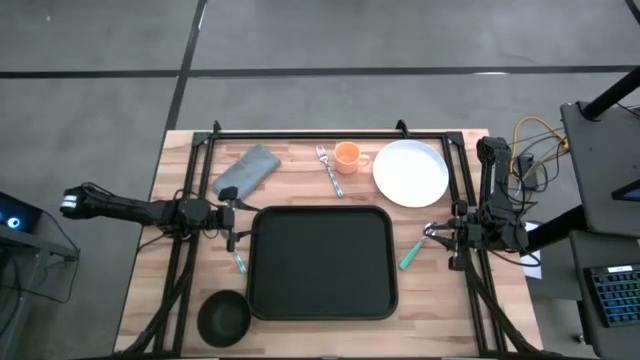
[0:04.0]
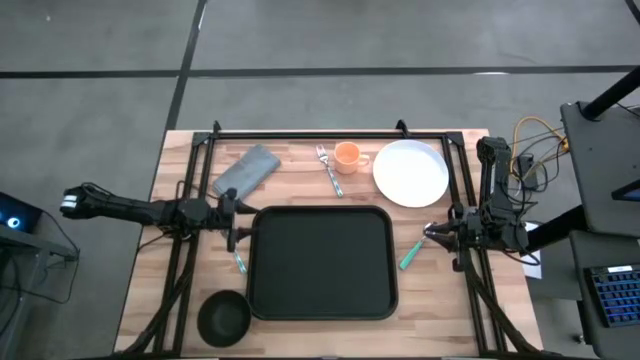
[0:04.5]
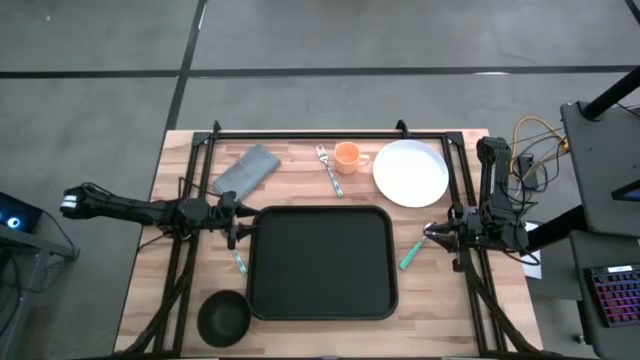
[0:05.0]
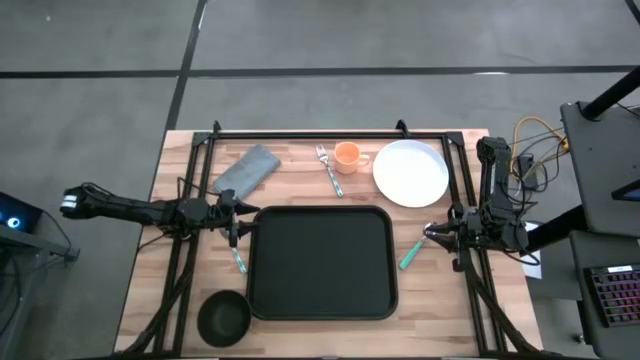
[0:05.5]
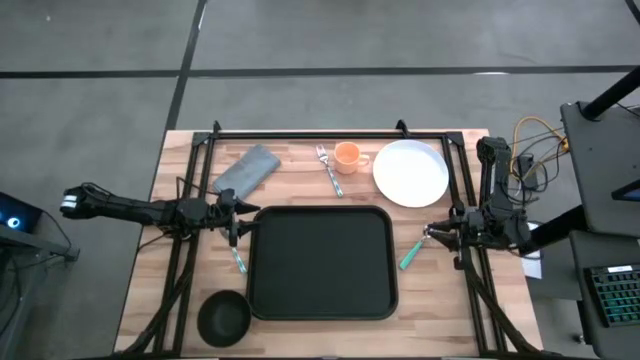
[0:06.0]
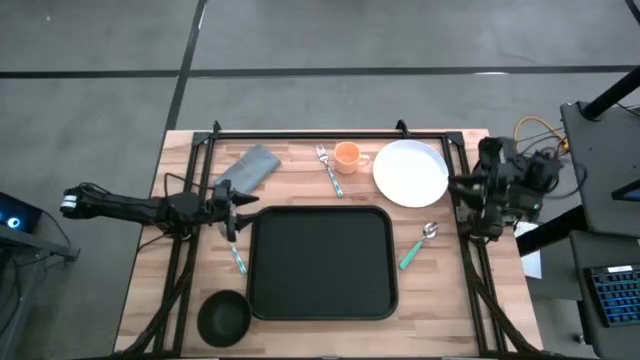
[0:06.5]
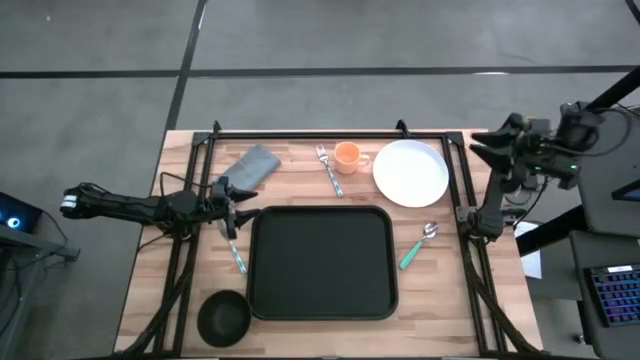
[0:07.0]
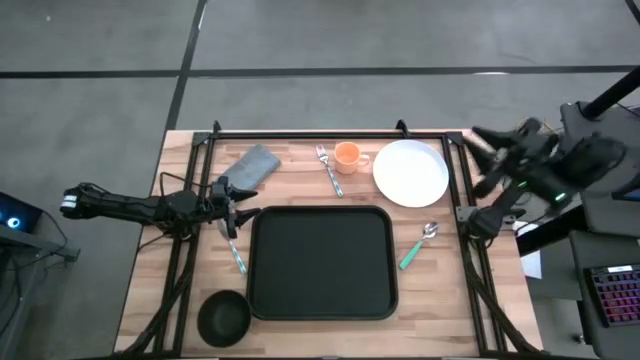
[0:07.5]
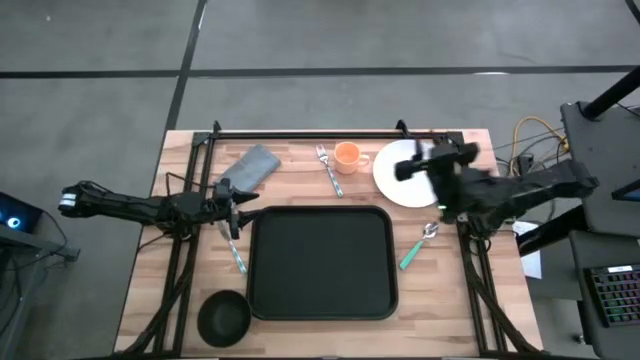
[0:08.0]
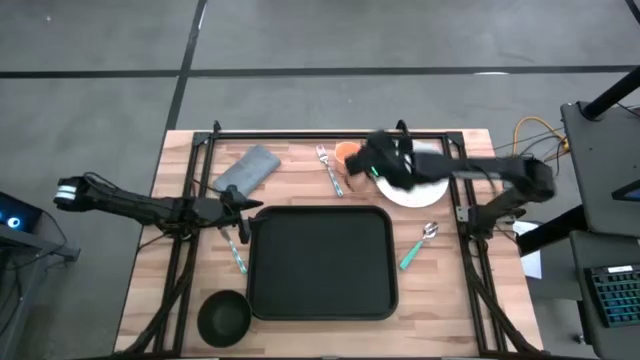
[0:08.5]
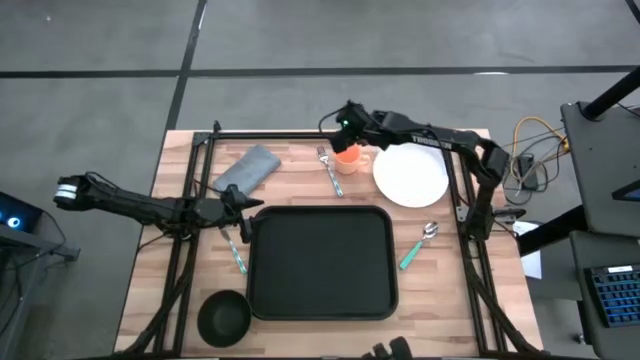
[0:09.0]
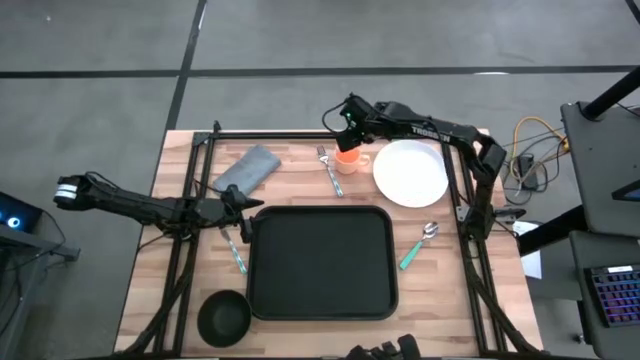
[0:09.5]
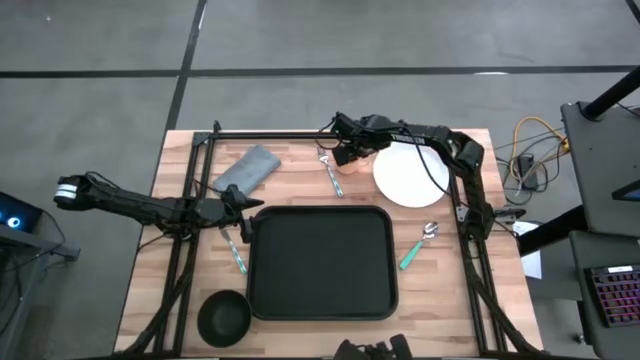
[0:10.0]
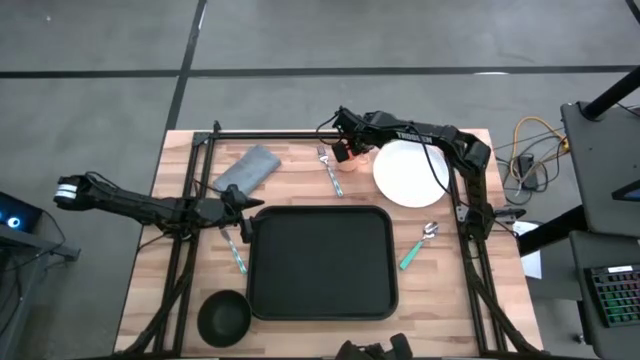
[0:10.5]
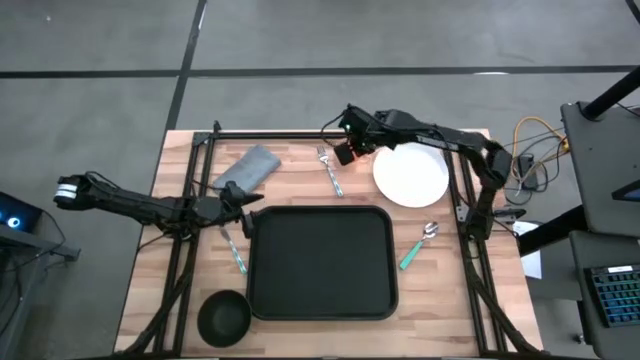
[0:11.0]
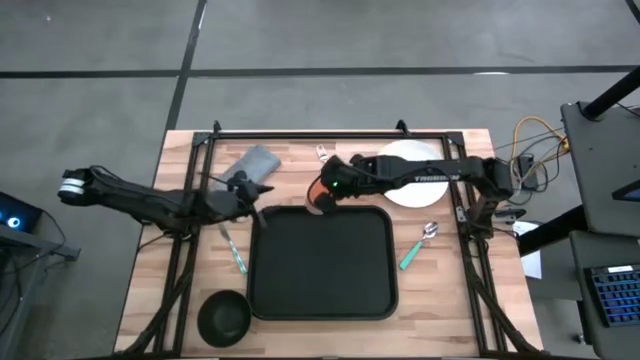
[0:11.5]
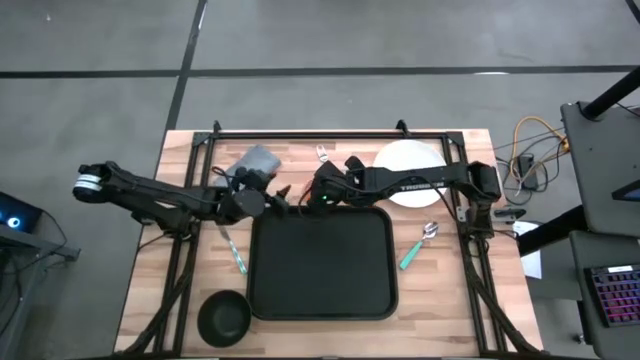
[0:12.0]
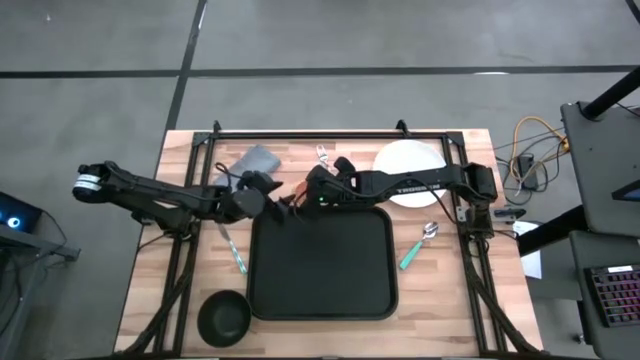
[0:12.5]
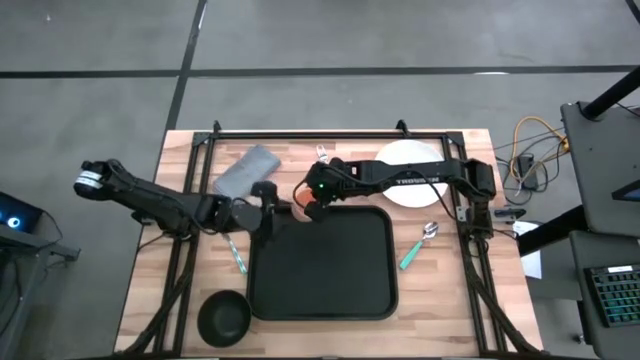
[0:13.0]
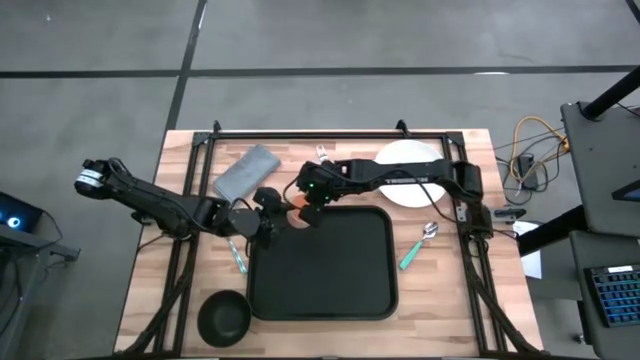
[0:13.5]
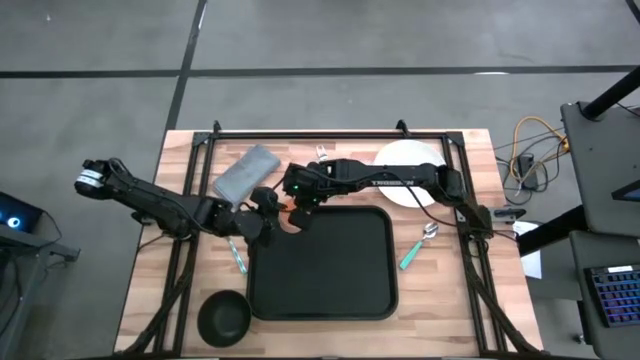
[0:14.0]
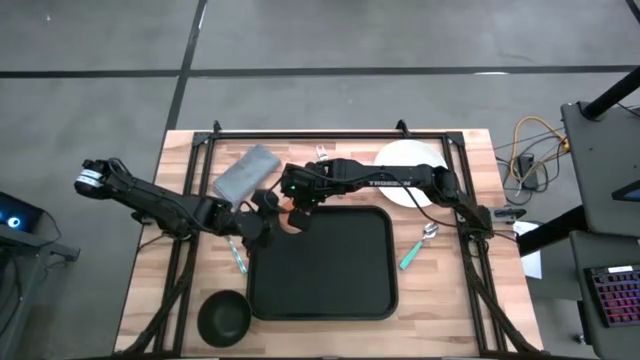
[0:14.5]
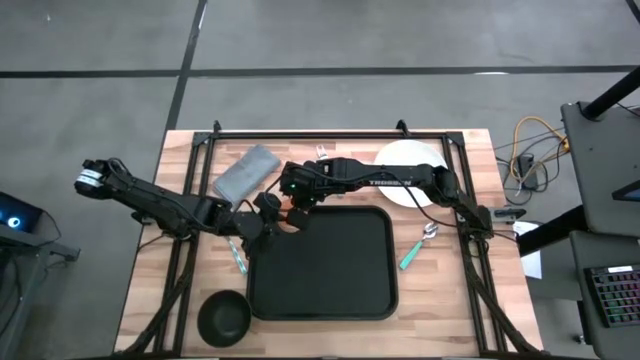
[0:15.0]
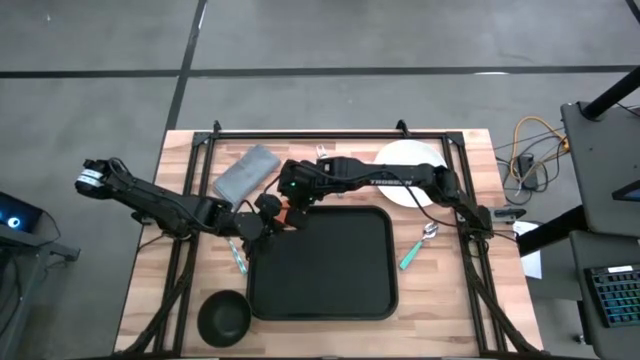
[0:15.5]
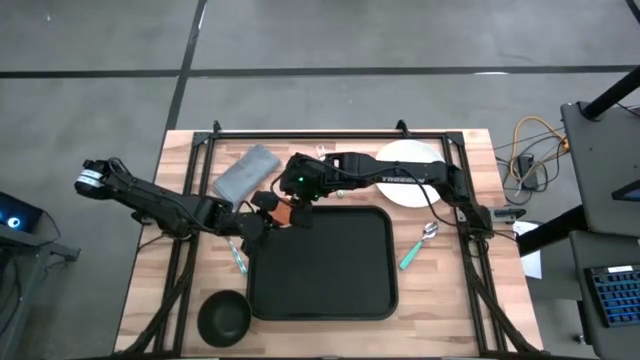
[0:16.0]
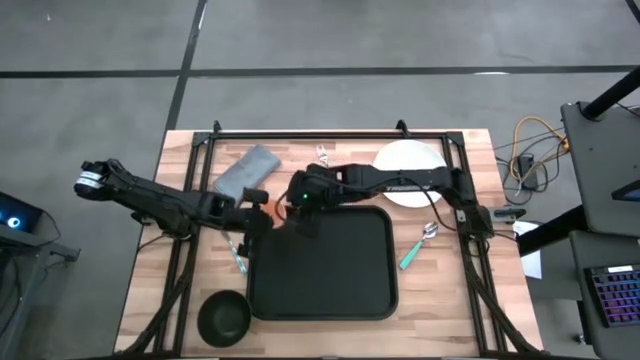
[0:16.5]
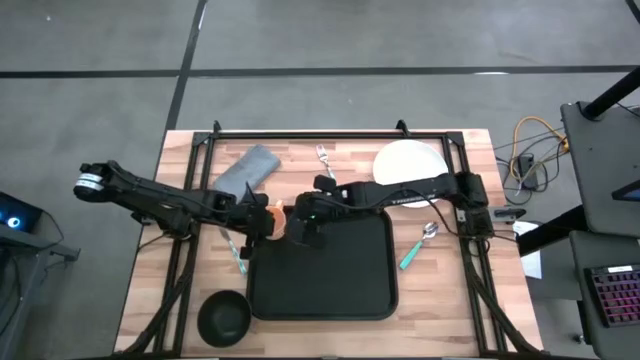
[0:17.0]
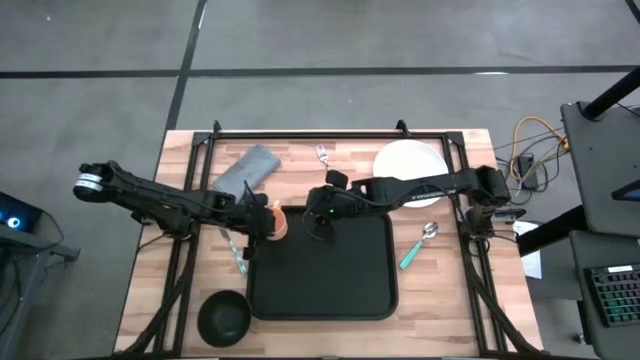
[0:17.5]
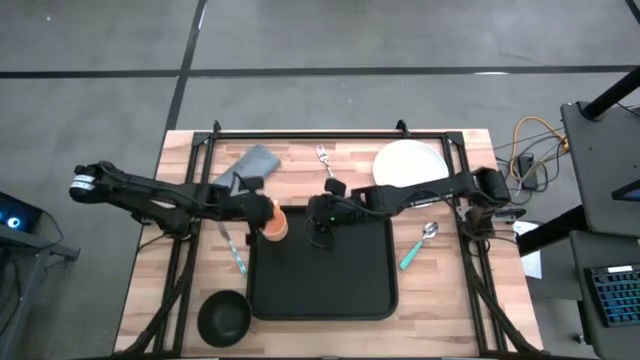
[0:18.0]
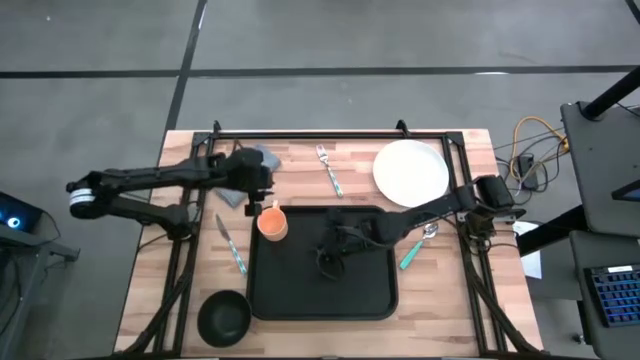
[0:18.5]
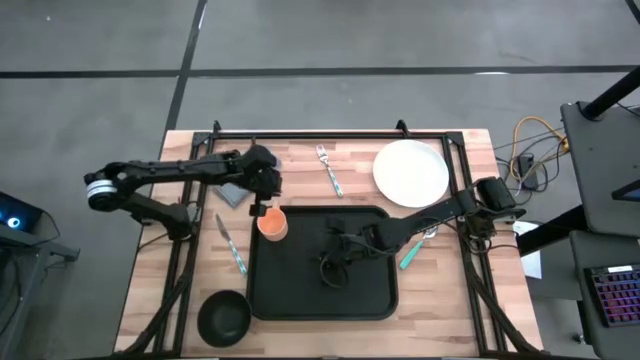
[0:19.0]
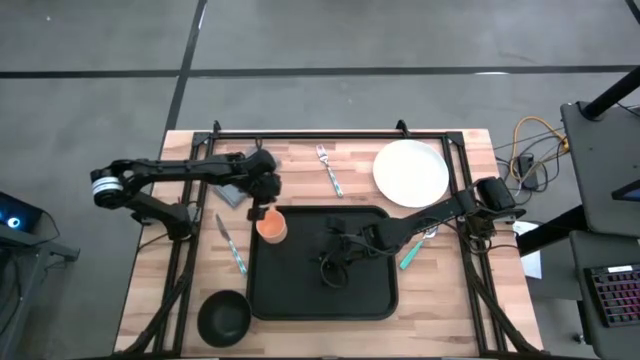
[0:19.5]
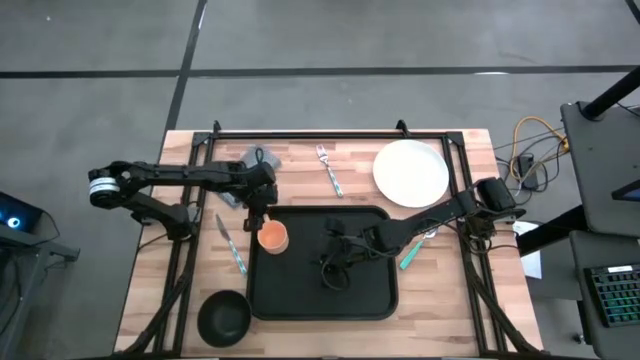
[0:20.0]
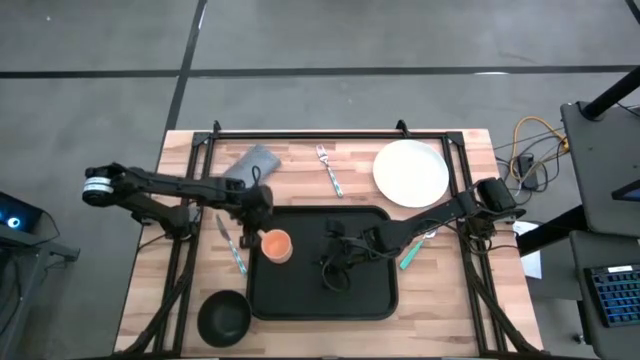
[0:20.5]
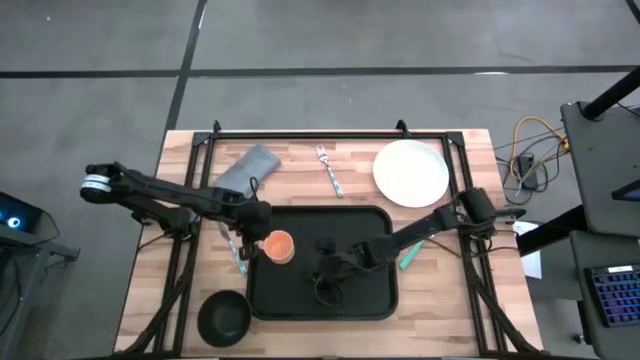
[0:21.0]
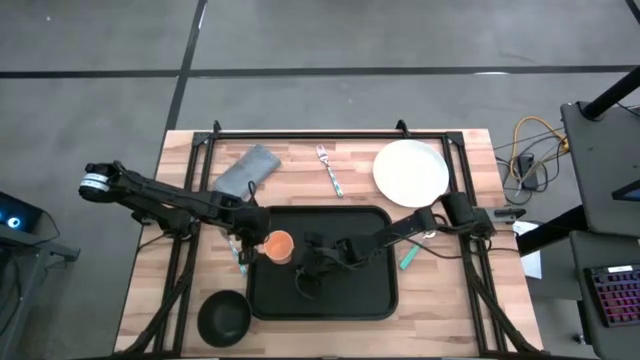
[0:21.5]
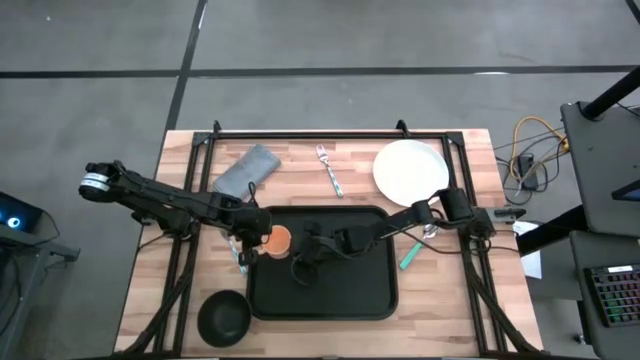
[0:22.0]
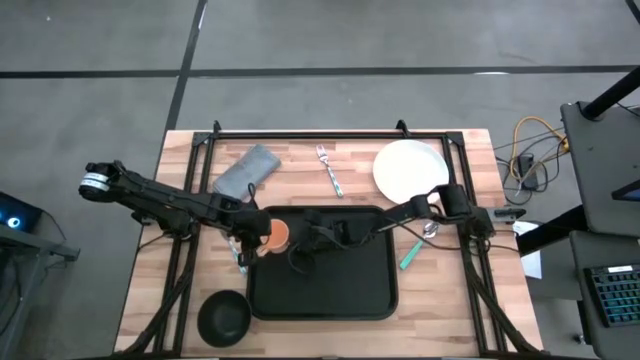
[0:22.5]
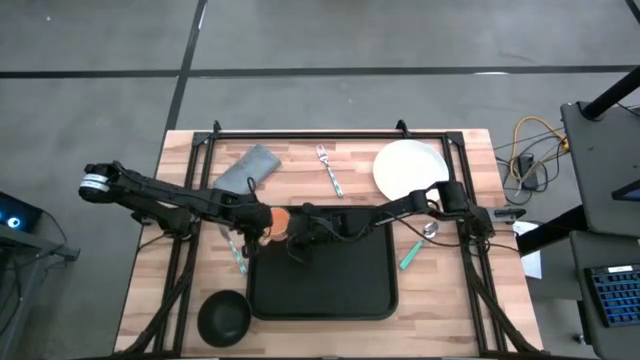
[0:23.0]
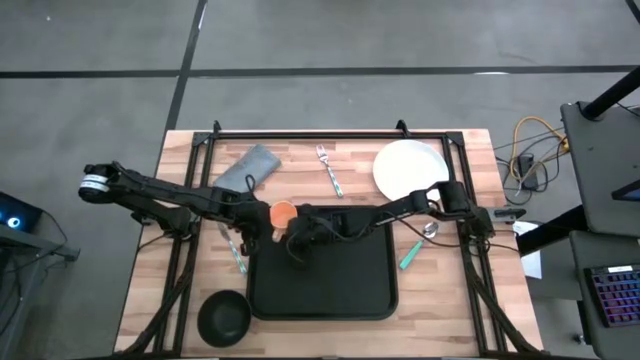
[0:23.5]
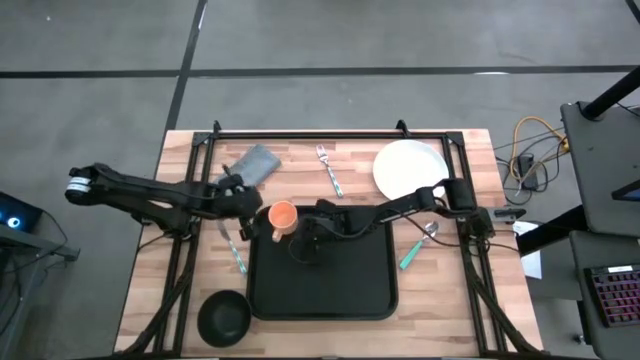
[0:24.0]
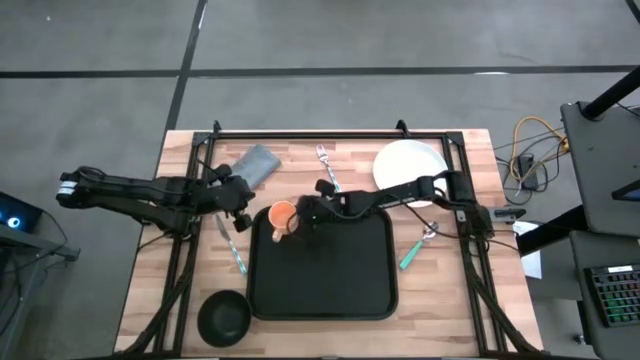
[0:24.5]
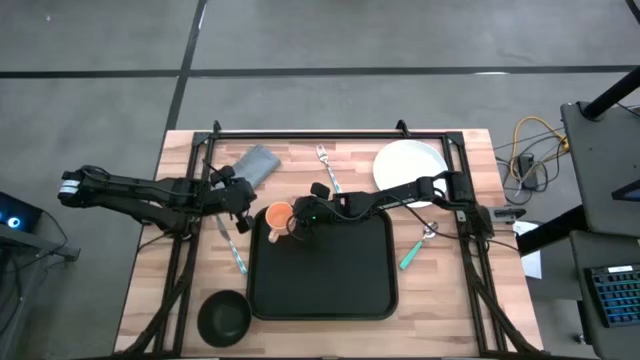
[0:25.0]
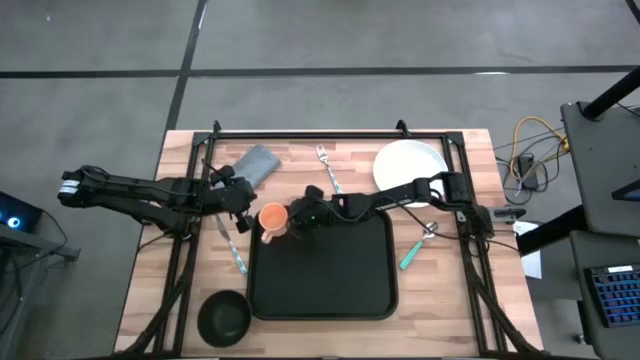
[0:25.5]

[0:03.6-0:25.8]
Task: Set up tray
Put the orange mug on the black tray
